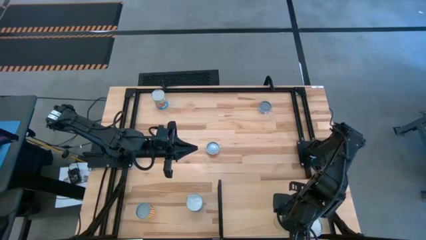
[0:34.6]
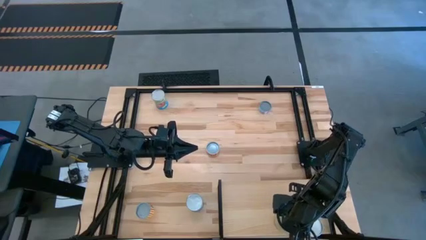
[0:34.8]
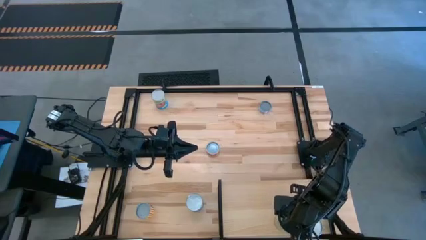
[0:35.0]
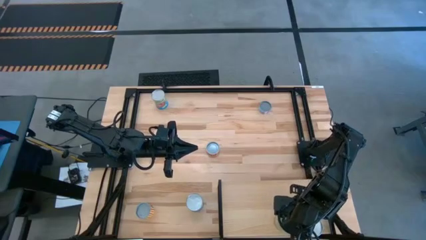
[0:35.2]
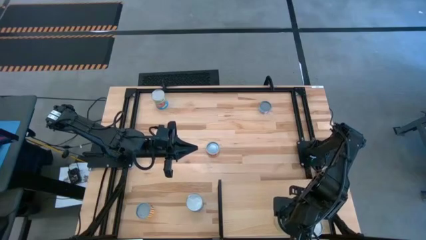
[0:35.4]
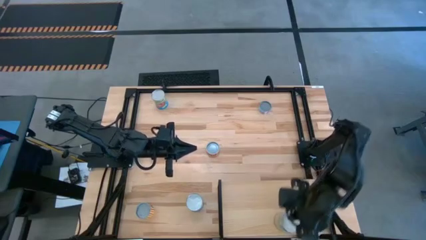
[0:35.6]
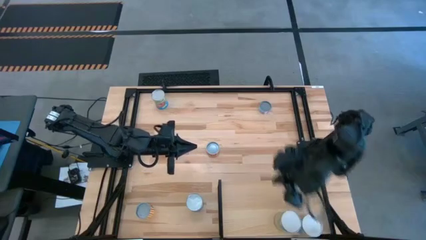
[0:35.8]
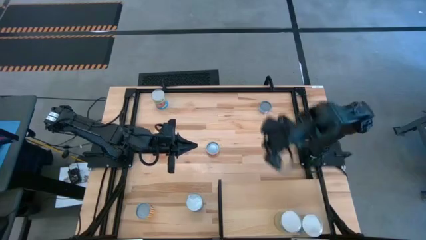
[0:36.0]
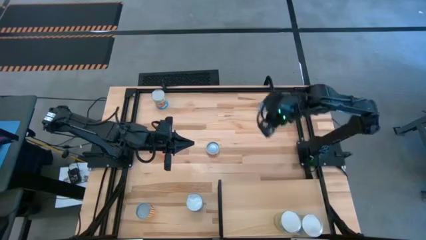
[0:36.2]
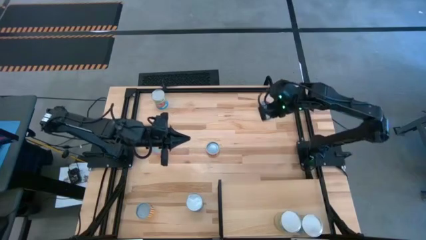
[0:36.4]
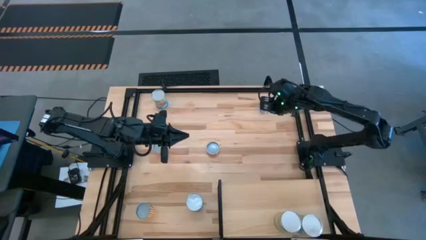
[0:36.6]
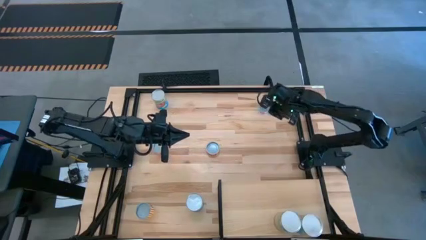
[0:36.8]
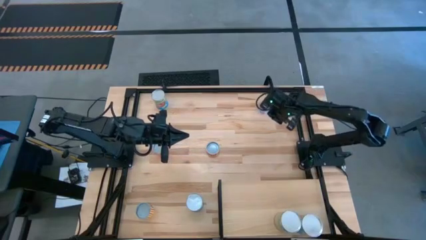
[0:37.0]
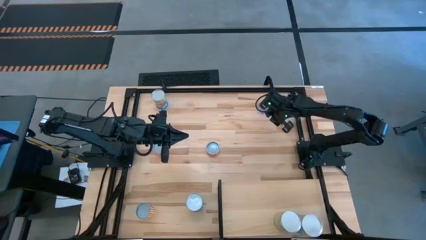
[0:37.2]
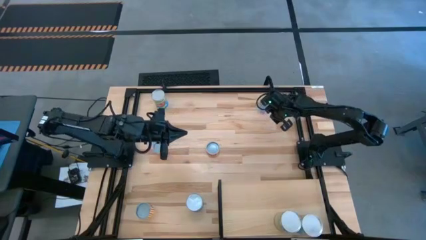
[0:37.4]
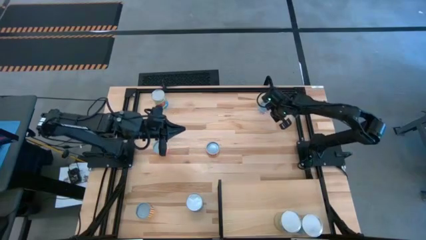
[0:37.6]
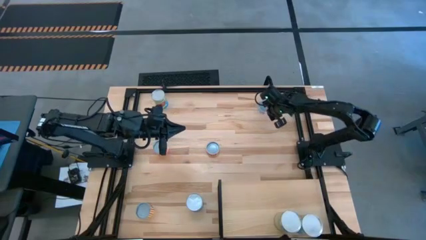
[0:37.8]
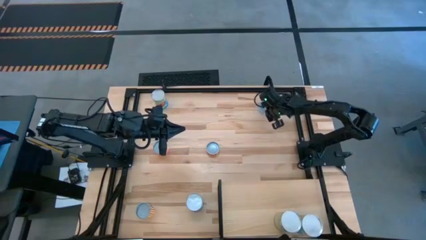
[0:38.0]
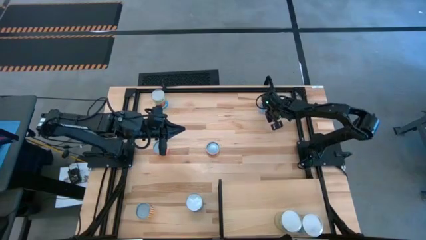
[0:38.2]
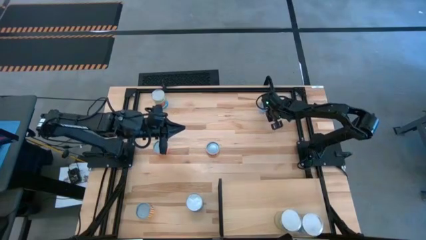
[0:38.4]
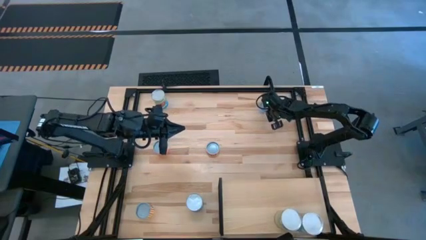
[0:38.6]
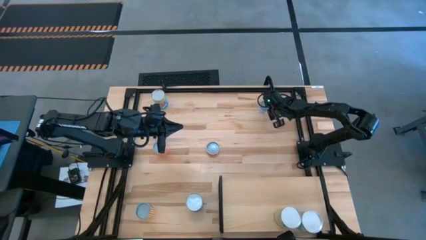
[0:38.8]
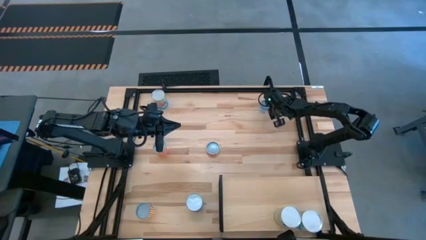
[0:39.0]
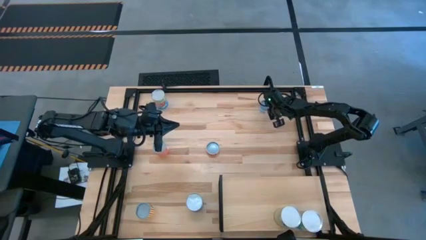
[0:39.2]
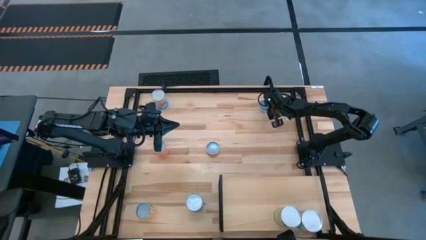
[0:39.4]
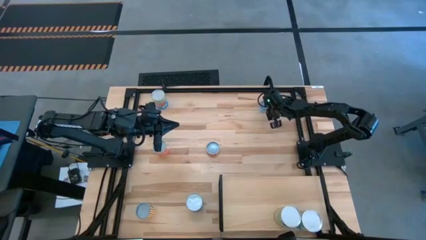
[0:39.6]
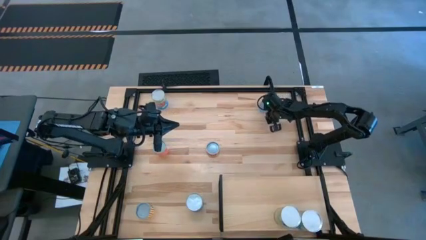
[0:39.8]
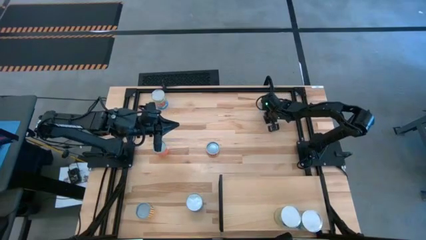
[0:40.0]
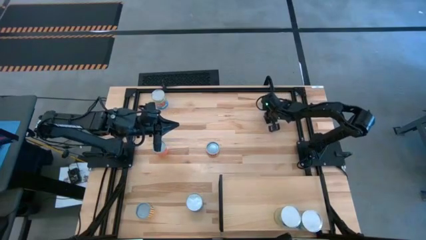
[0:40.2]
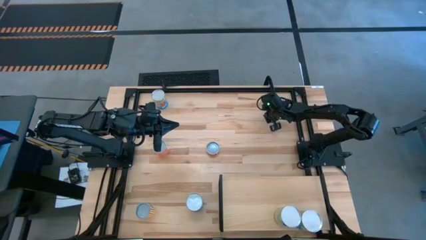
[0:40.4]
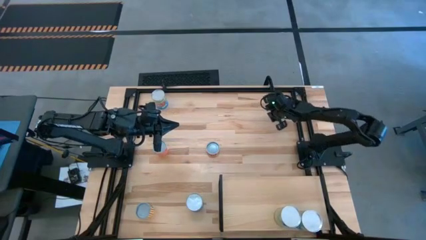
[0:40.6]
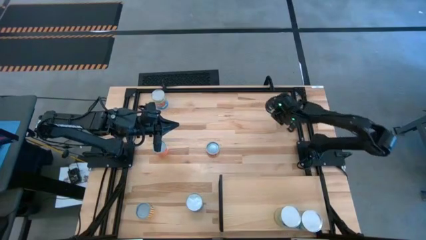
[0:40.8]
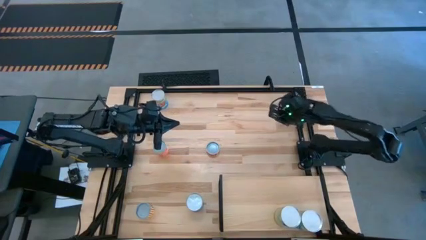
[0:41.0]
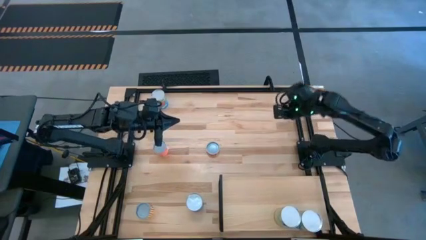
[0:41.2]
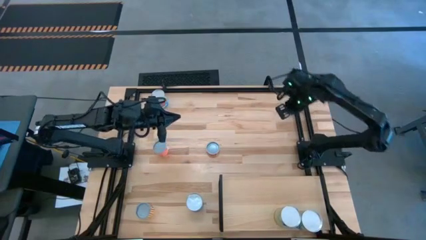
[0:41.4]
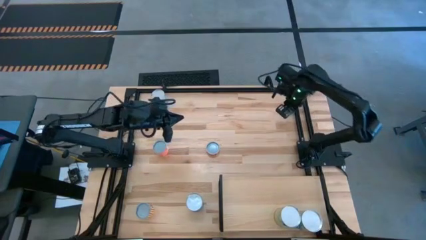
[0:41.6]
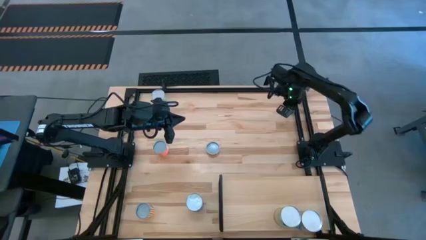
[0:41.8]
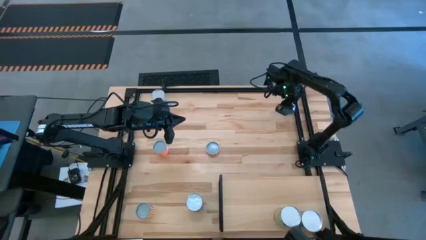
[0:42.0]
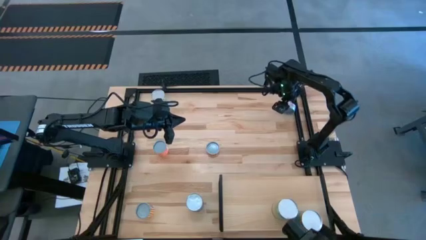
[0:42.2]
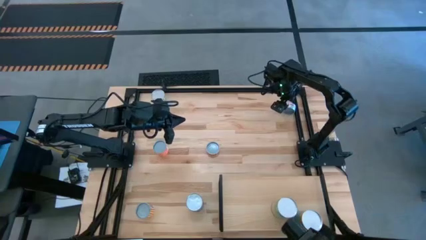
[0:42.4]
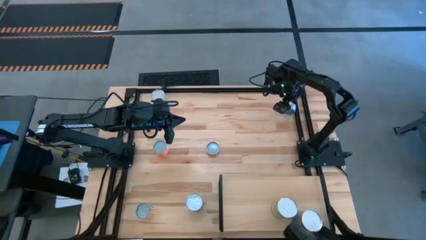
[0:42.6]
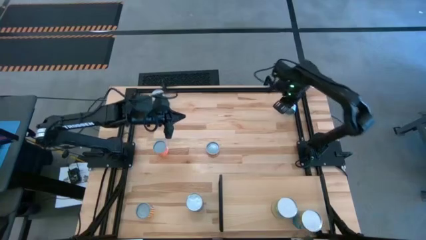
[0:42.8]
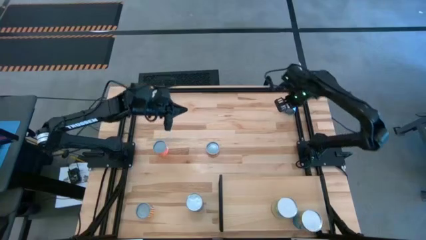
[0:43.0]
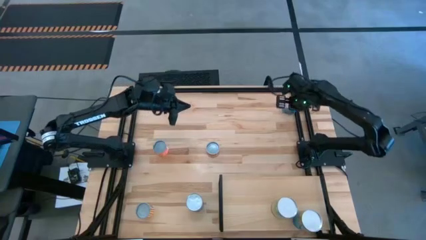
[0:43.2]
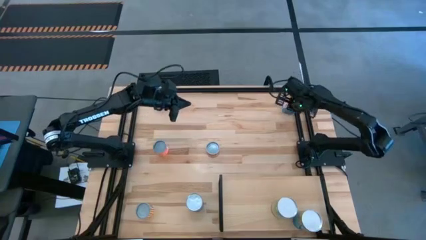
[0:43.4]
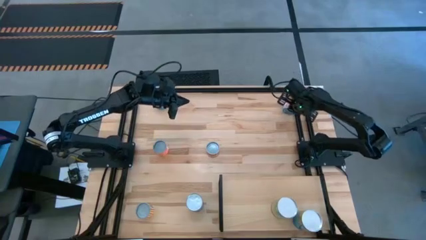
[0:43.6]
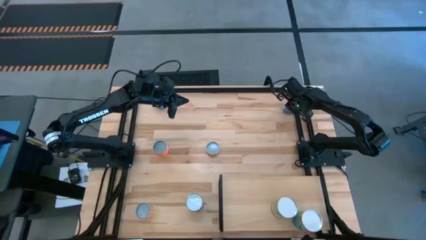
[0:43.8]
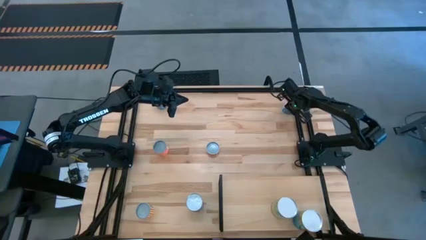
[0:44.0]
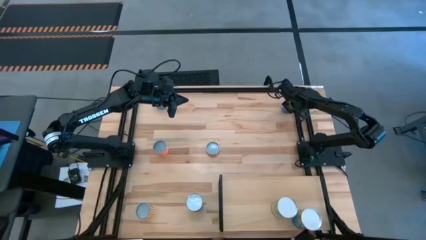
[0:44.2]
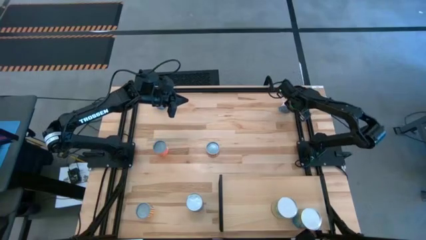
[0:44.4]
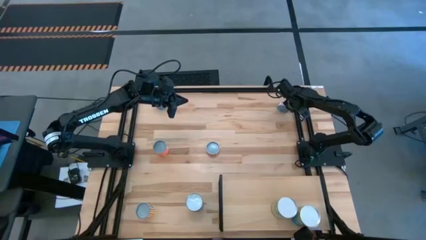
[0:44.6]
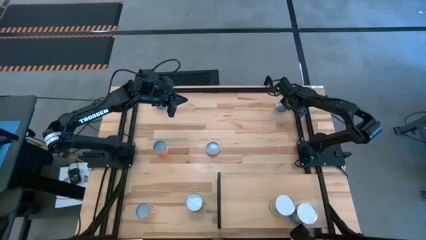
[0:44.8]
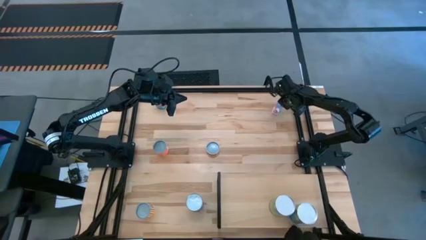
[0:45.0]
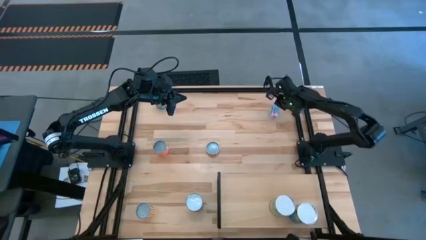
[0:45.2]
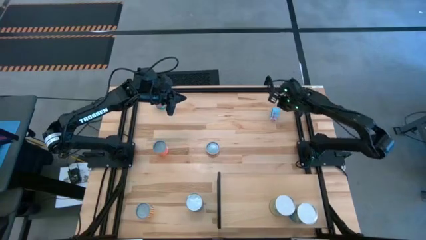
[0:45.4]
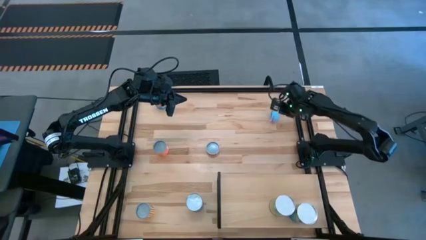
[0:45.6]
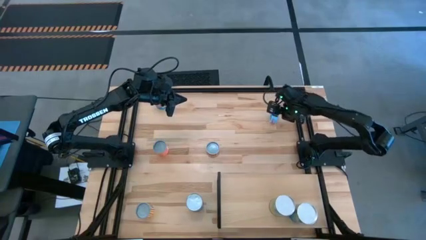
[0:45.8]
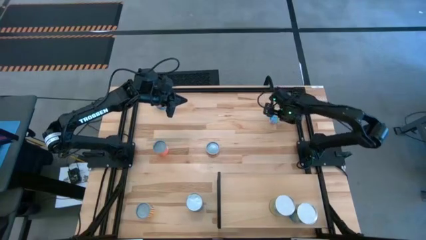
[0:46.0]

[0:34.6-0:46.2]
Task: Pick and place cans onto a shelf
Put the canned tuna on the shelf

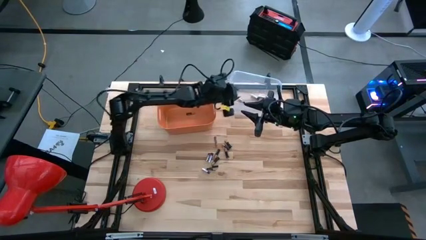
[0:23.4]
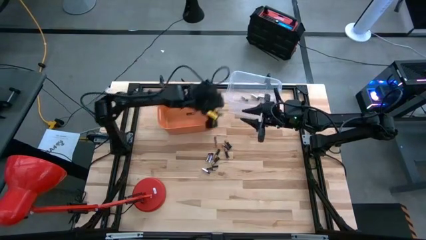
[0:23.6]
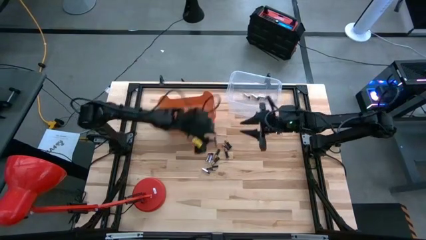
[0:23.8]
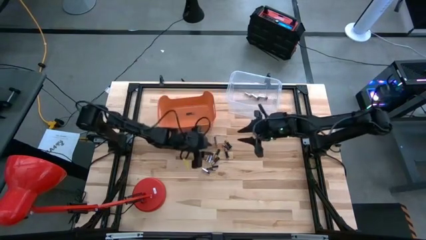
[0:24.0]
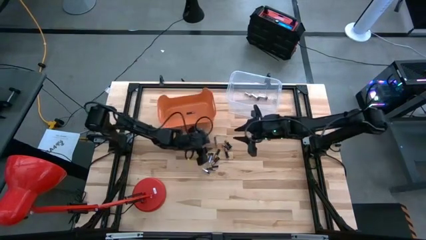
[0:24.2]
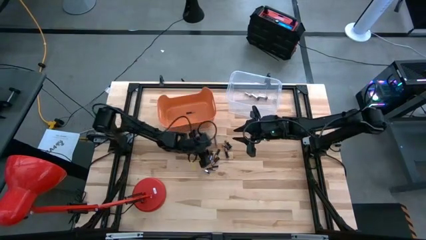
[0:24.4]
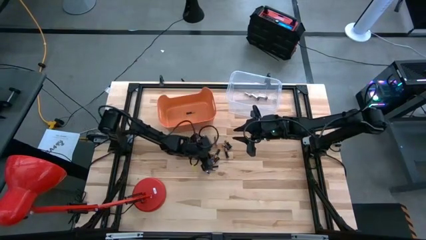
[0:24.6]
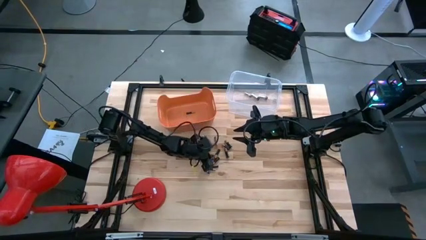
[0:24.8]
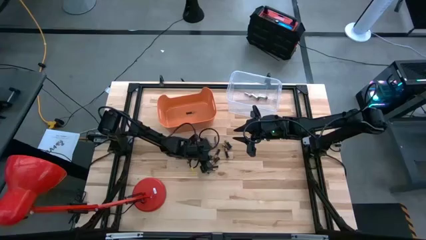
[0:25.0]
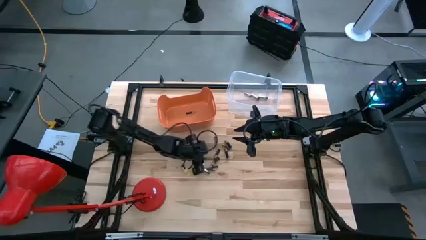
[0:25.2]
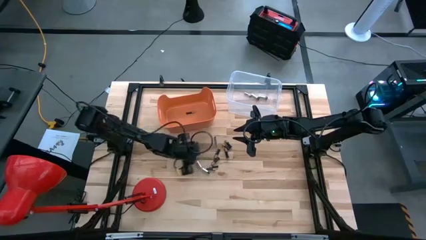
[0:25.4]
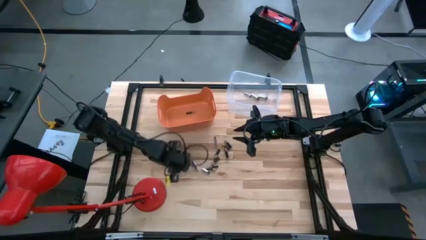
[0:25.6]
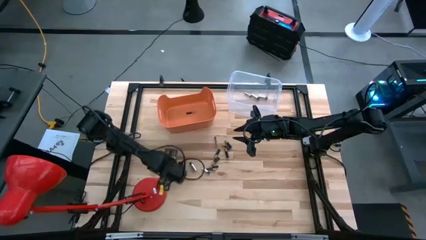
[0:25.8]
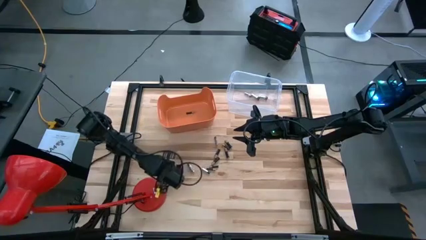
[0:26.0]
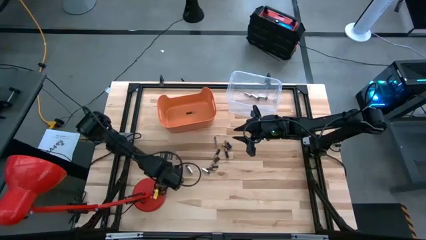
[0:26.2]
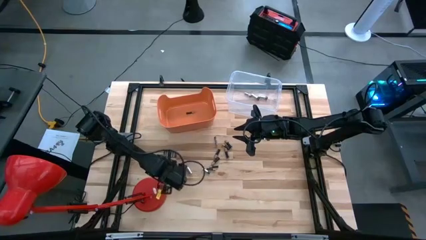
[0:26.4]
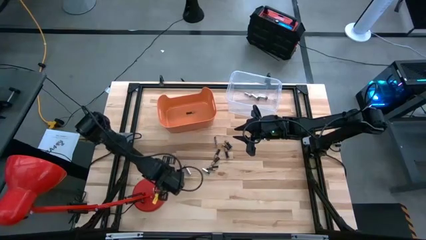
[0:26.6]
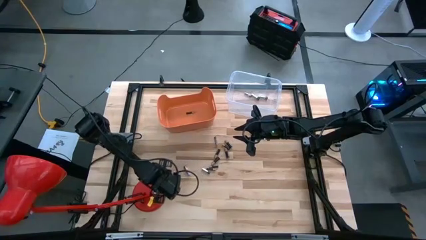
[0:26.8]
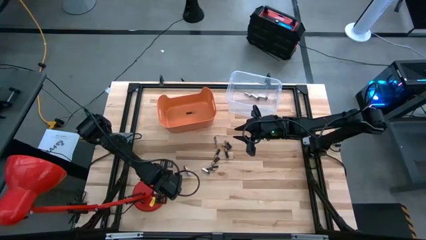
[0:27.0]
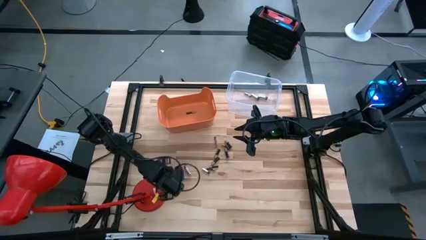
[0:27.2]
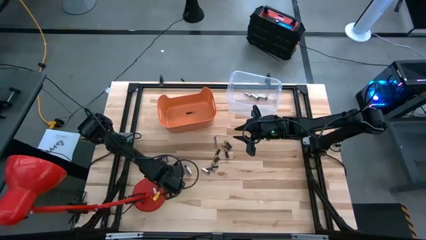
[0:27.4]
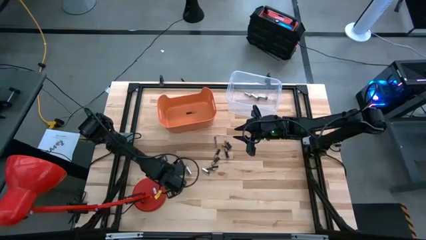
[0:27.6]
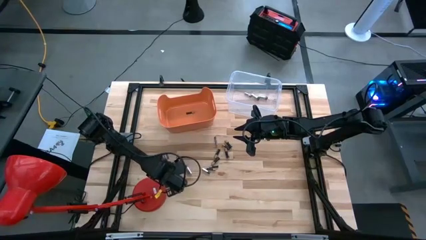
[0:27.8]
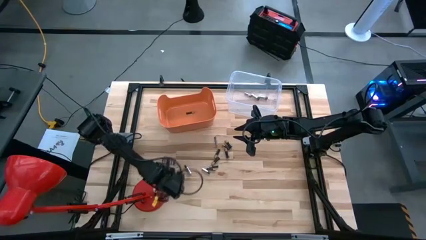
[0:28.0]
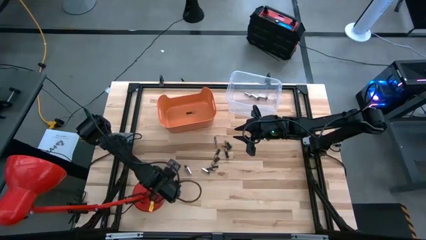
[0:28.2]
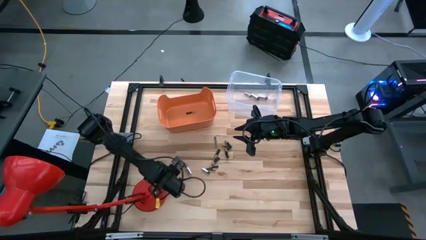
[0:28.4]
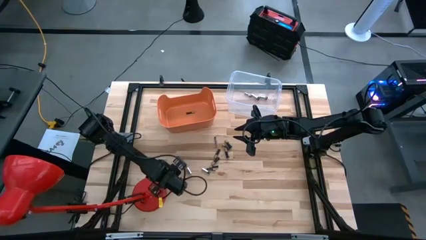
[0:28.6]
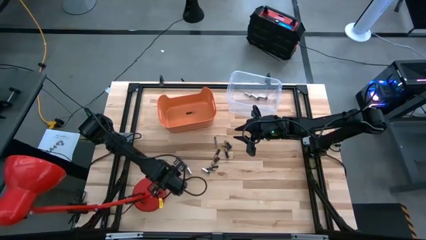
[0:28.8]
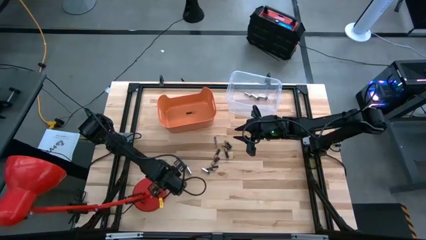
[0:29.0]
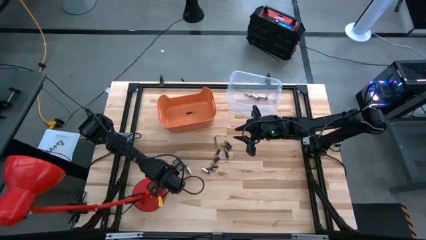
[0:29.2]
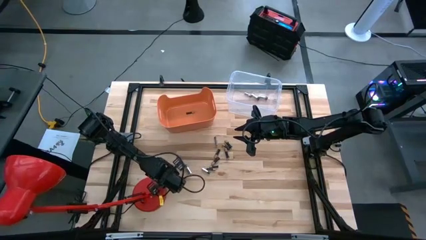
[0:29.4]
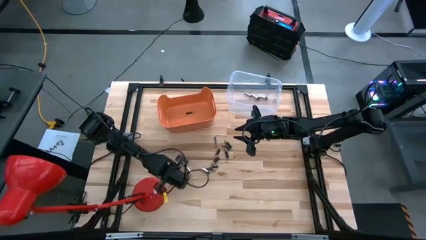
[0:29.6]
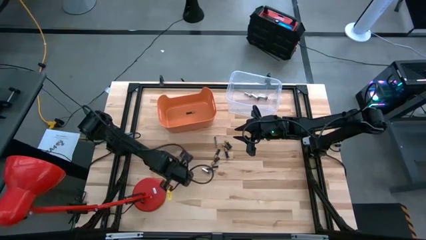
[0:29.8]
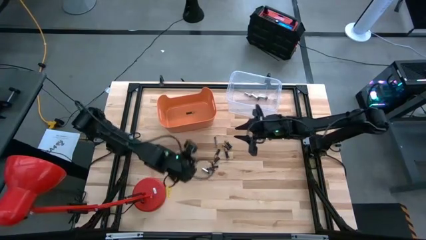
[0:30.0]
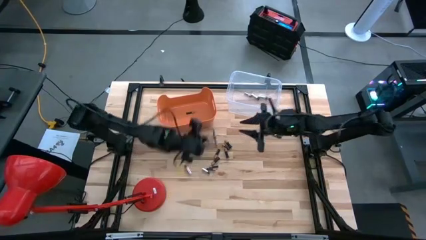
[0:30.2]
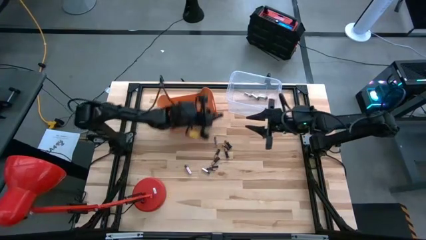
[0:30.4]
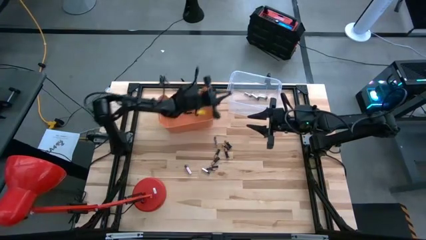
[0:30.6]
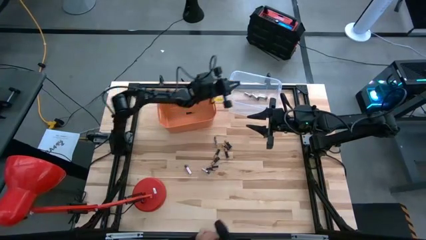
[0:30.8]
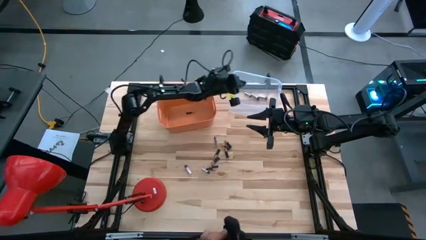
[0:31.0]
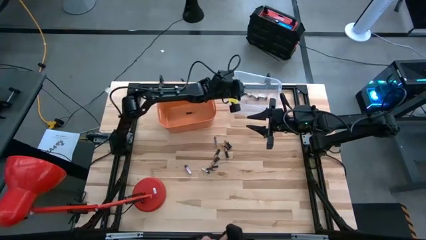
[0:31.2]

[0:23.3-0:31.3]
Task: Sort batteries
Put the silver battery into the transparent bin
